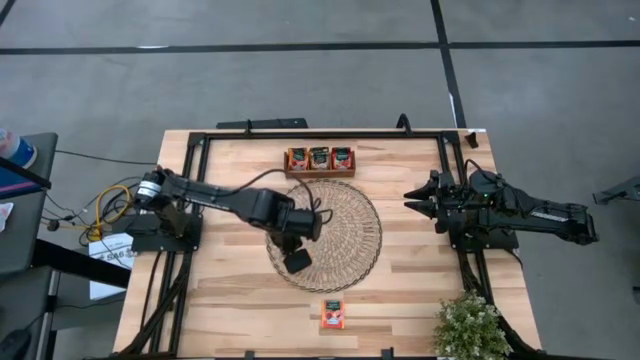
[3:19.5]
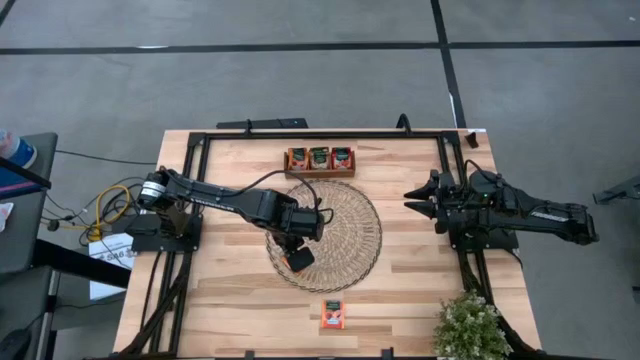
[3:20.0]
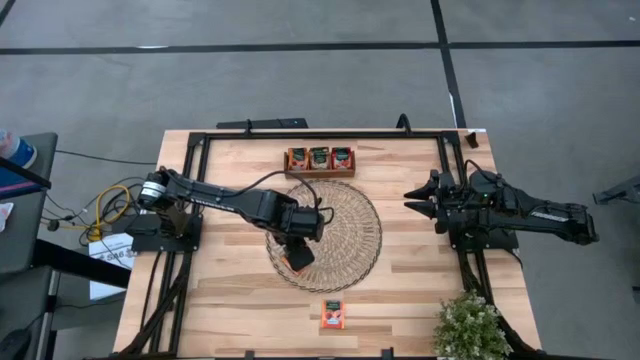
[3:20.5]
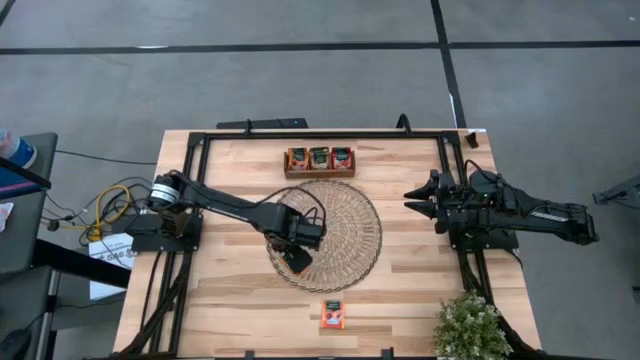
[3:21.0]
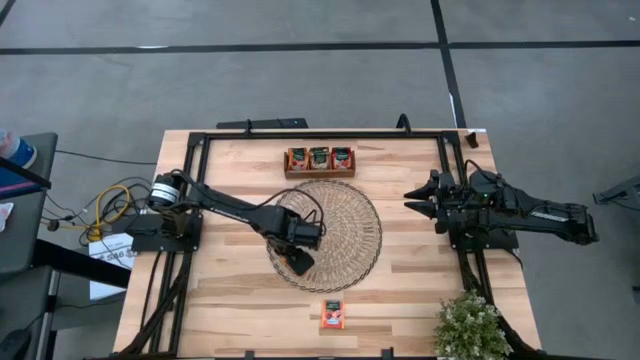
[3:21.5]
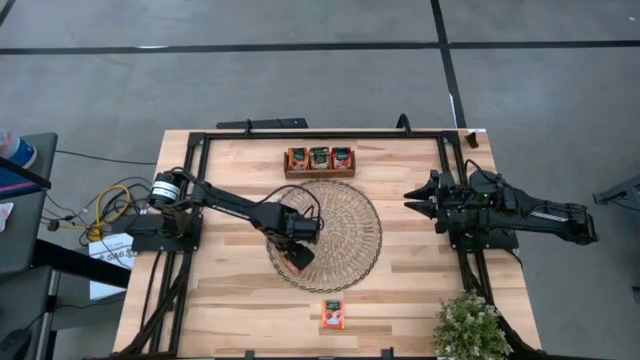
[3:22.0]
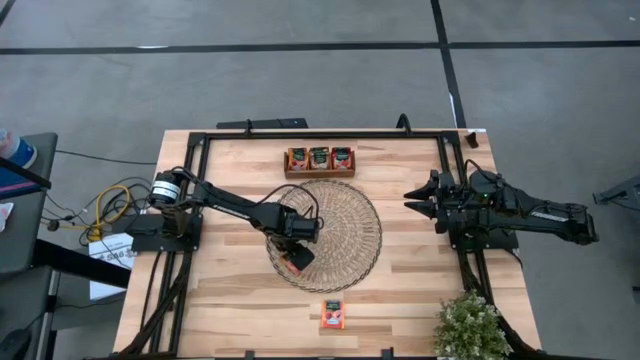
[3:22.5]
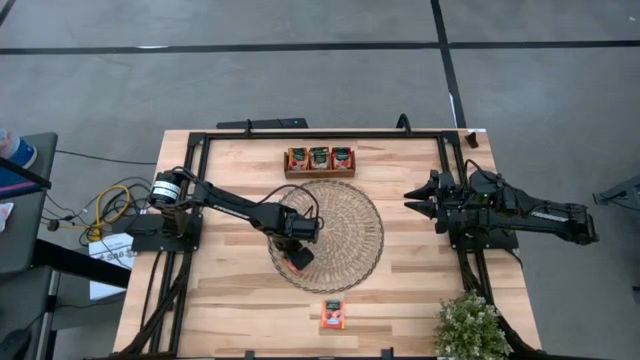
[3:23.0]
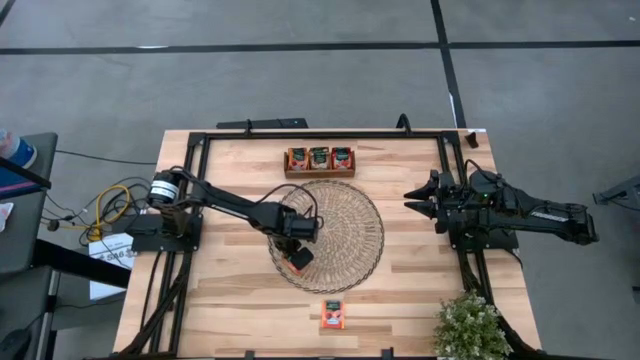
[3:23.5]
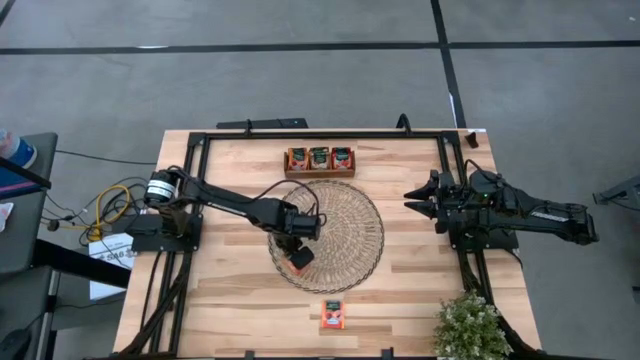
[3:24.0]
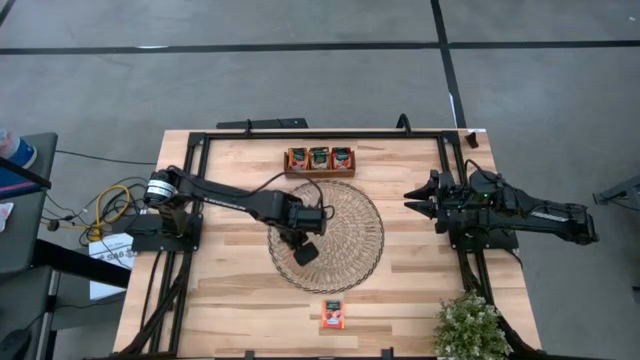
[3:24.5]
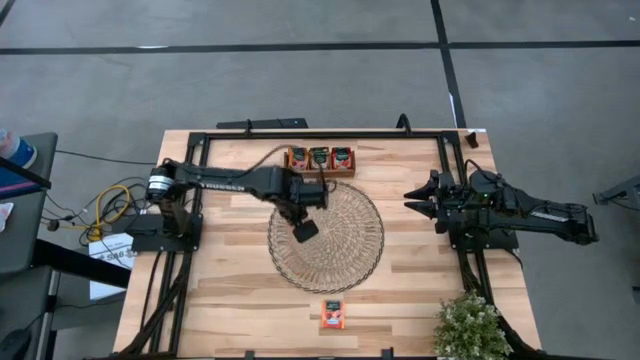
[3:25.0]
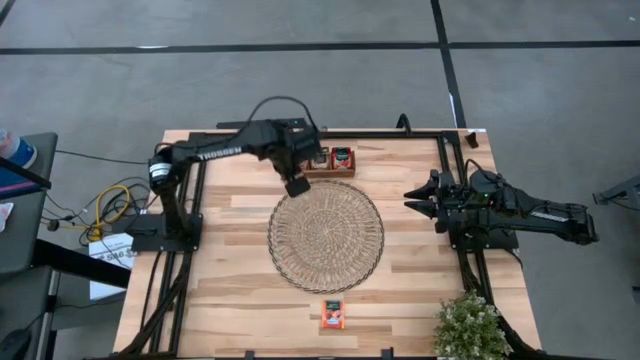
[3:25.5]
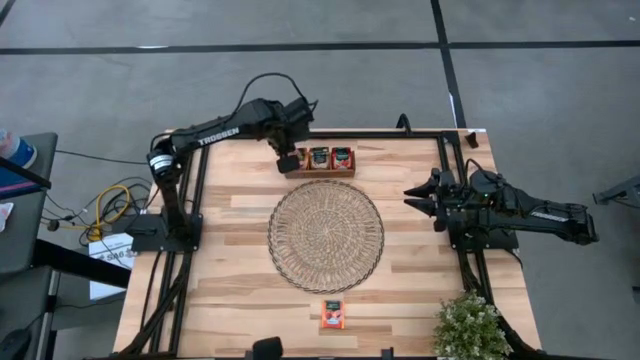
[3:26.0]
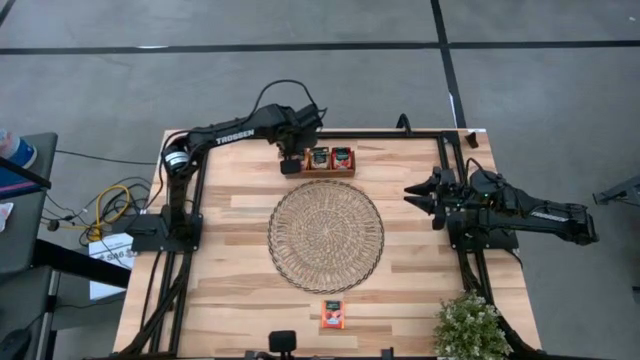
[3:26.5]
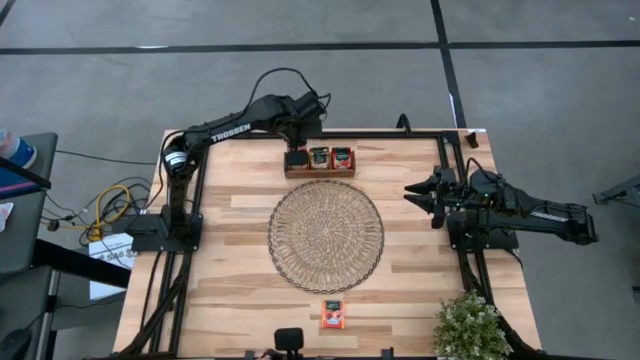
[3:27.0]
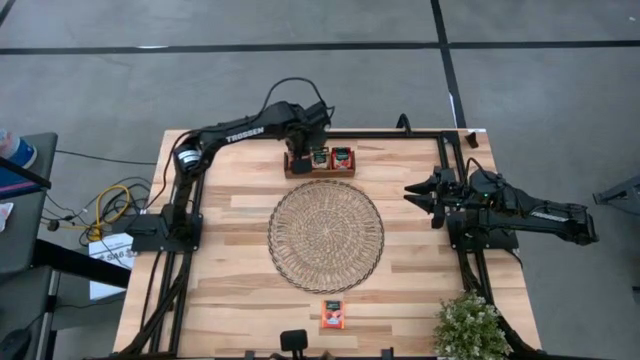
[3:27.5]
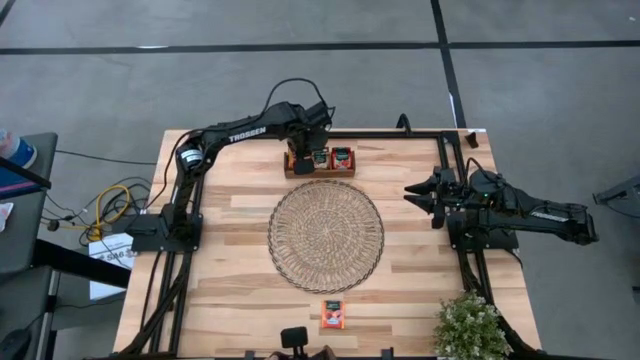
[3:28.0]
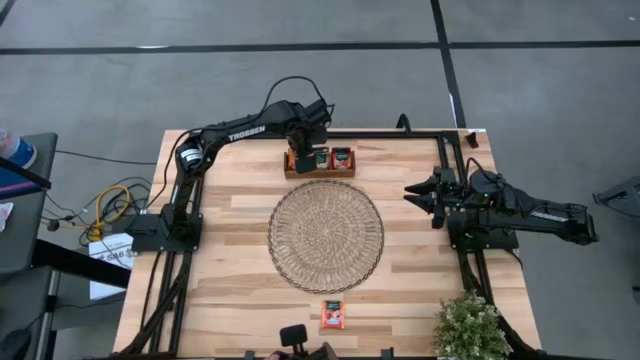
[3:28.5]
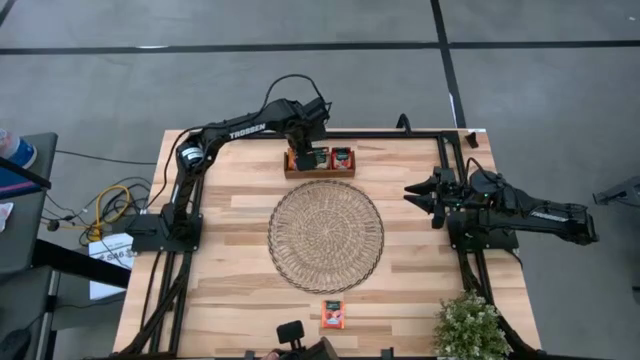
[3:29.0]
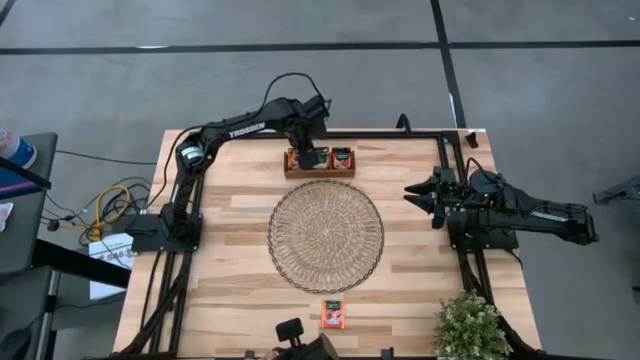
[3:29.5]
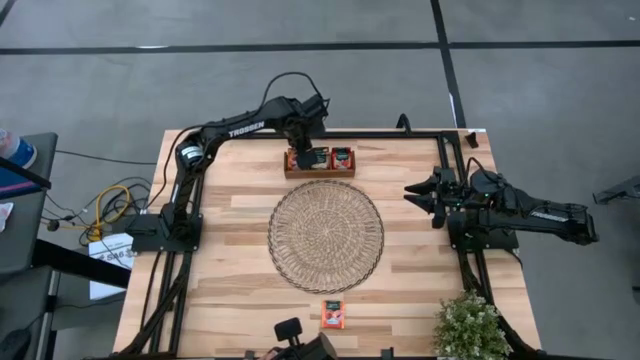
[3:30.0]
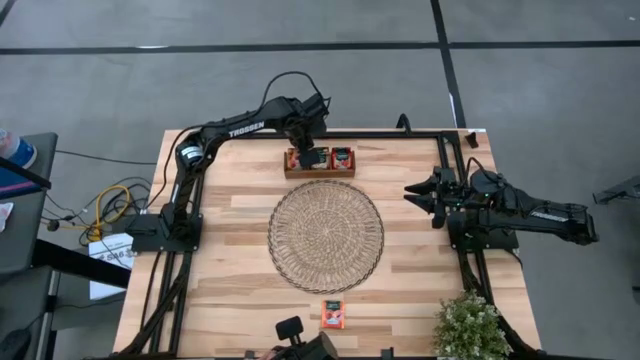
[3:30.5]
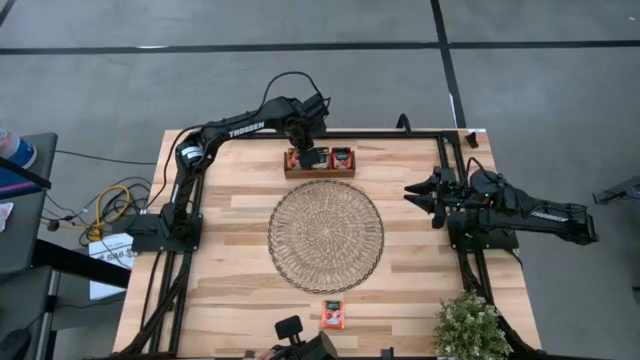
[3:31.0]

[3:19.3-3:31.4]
Task: Pick & Place Tea
Put the orange tea bag into the left section of the wooden organizer

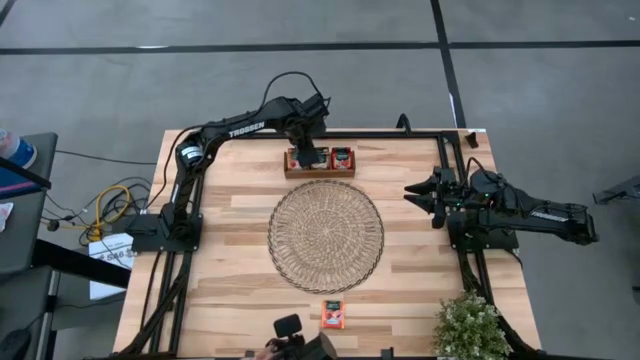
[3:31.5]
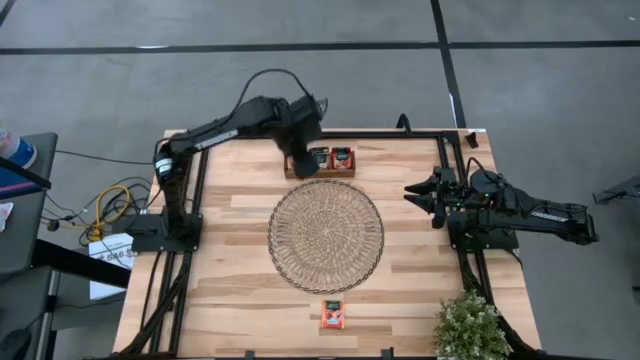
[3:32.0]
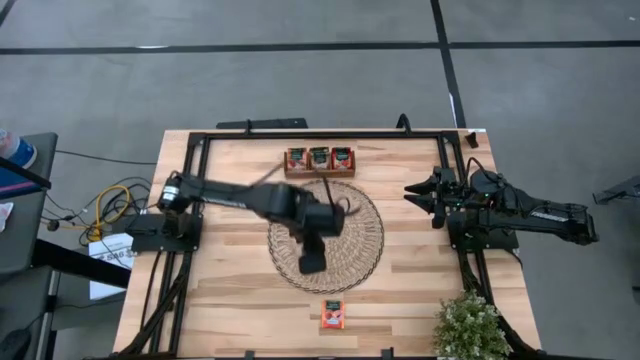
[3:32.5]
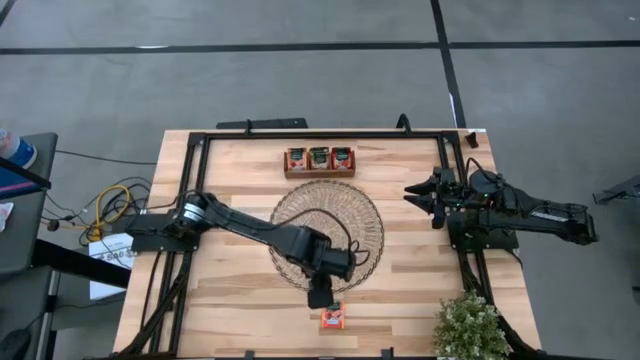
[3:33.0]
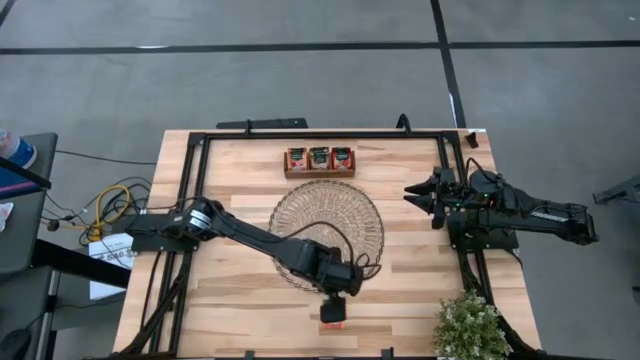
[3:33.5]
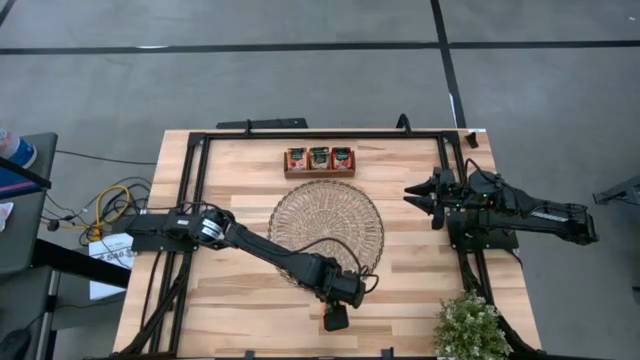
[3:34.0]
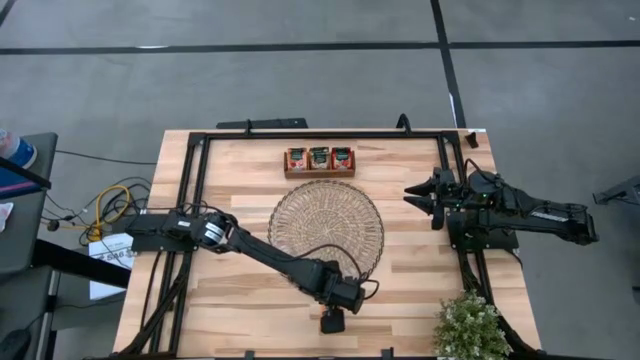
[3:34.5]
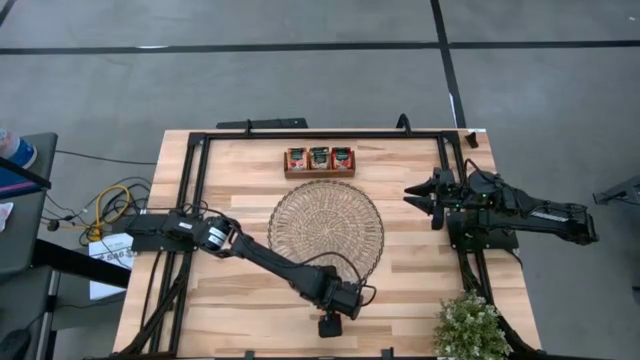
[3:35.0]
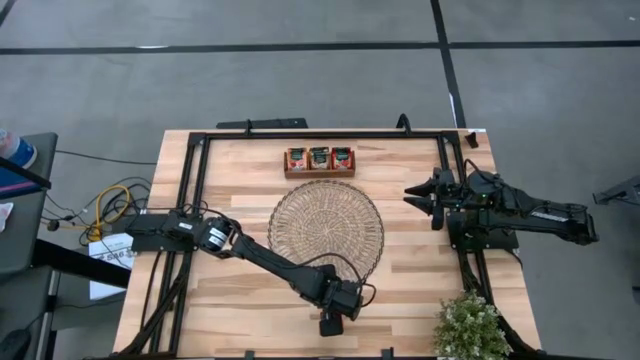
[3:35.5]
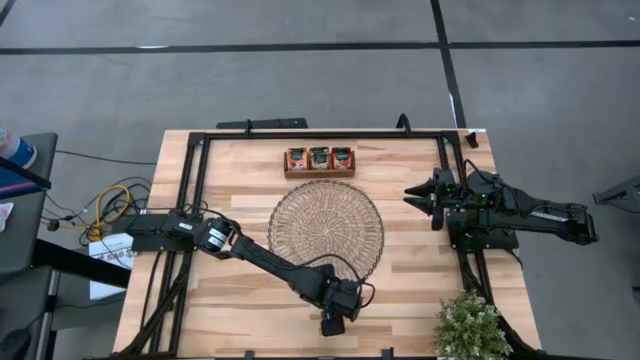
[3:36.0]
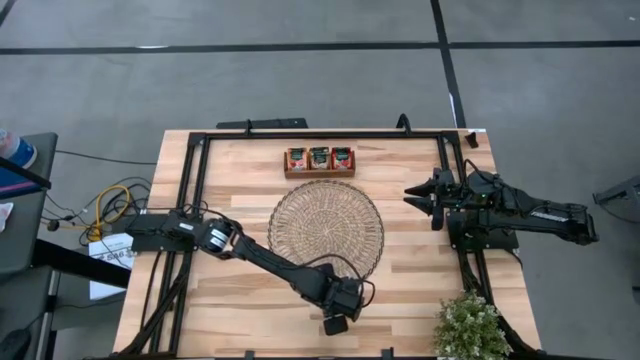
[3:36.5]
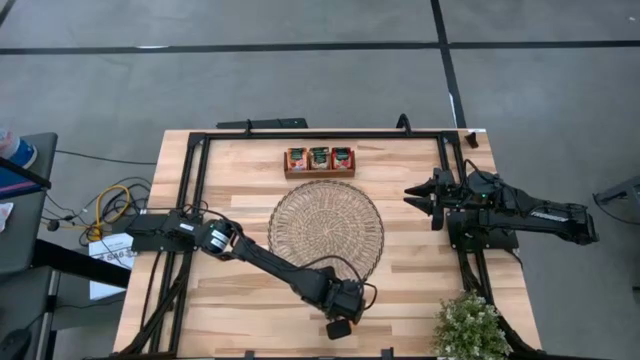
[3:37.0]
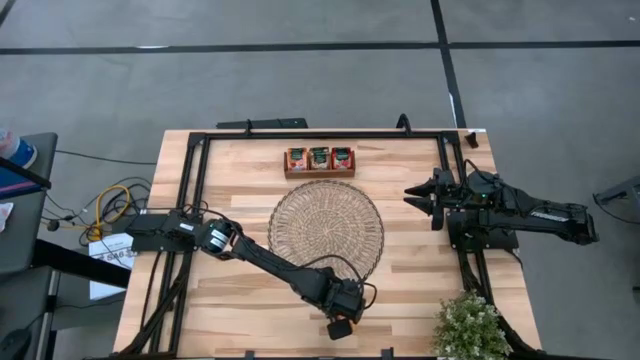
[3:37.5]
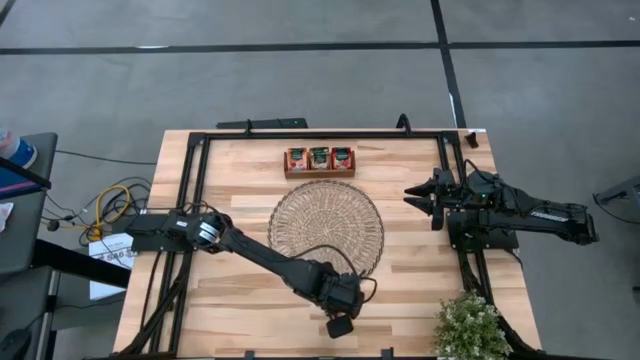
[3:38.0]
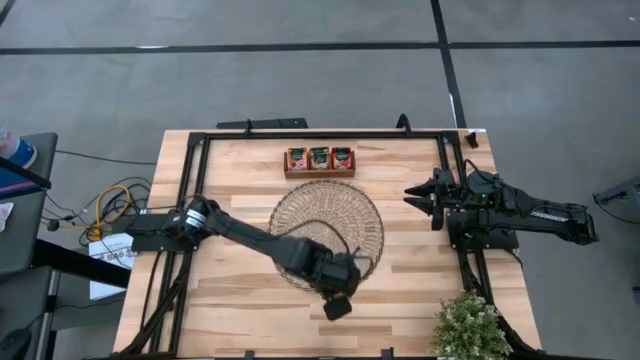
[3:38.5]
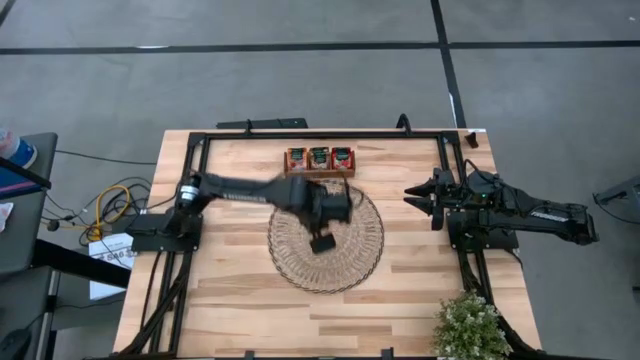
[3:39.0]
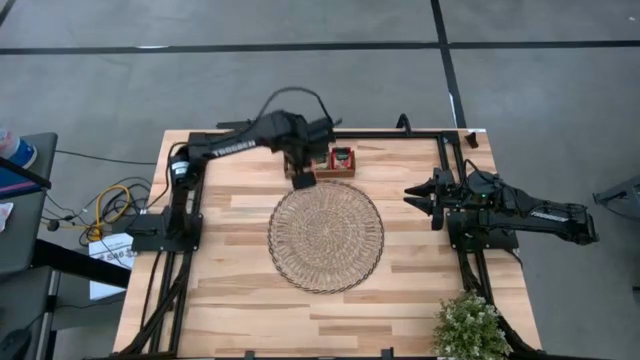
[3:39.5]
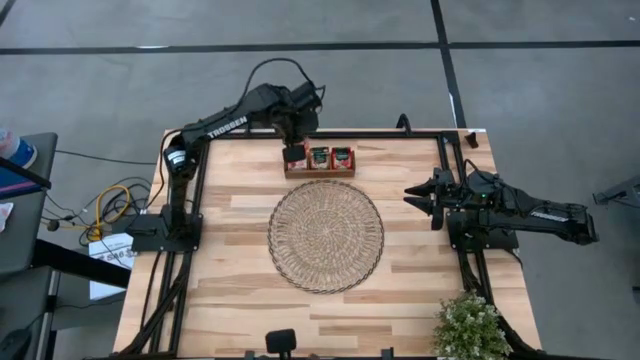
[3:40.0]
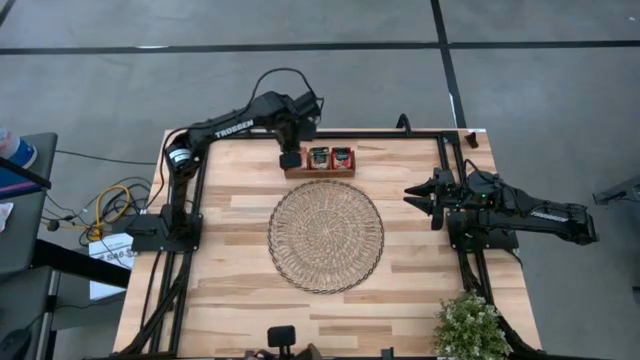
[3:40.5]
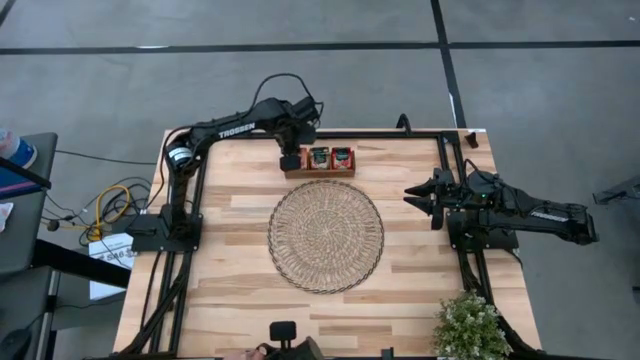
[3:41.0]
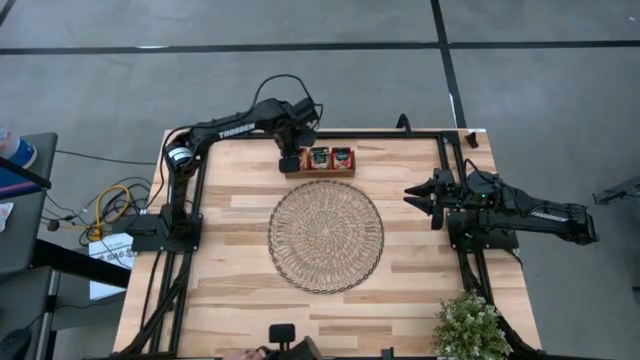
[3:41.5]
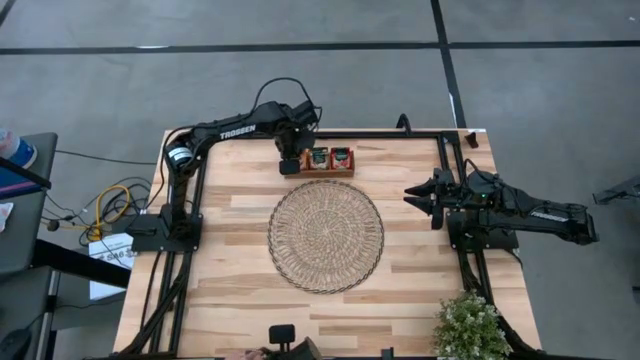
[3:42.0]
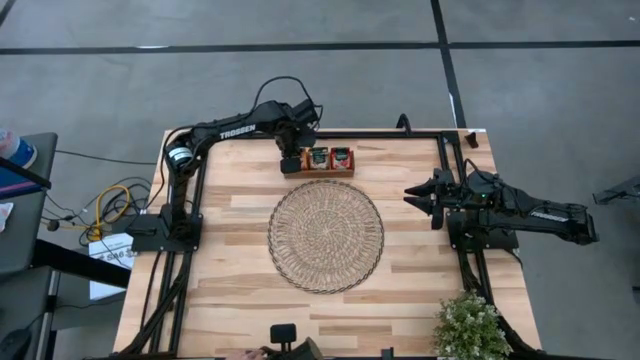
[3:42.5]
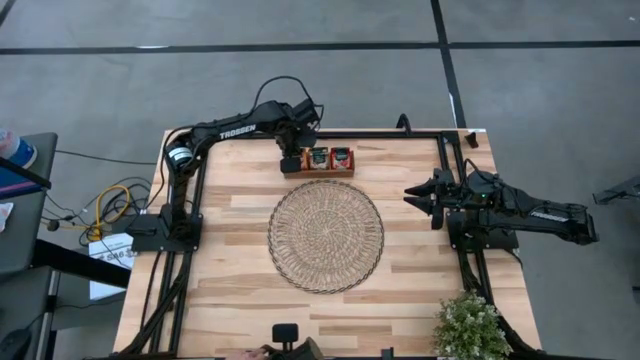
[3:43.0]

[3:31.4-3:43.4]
Put the orange tea bag into the left section of the wooden organizer
